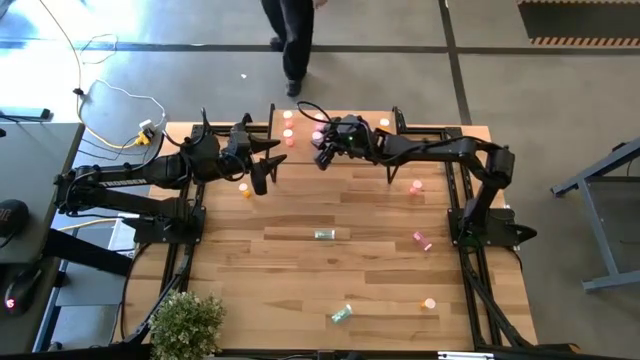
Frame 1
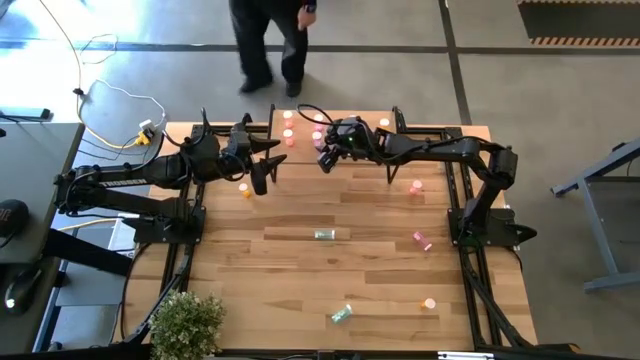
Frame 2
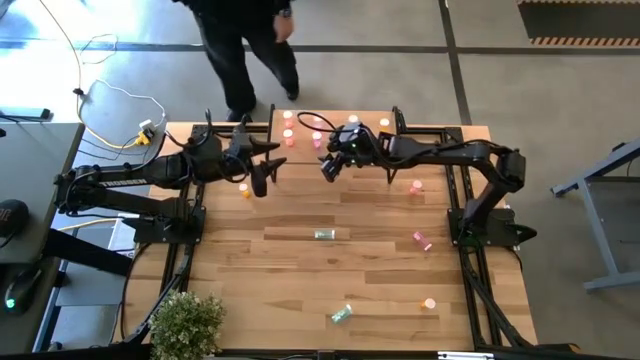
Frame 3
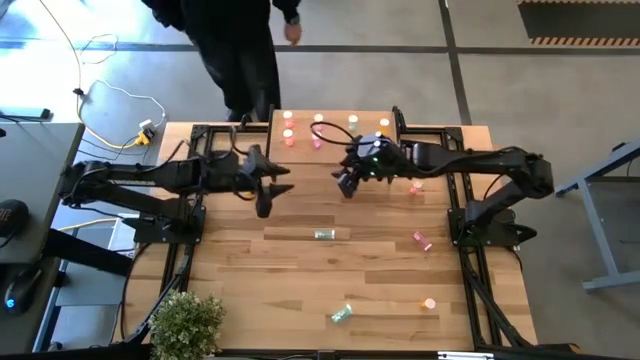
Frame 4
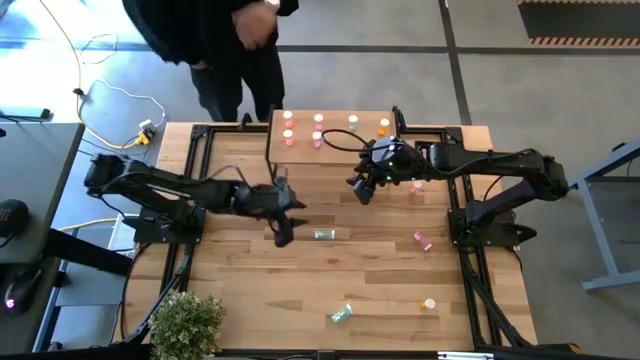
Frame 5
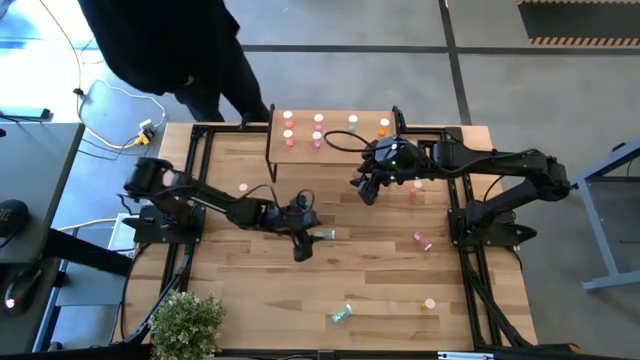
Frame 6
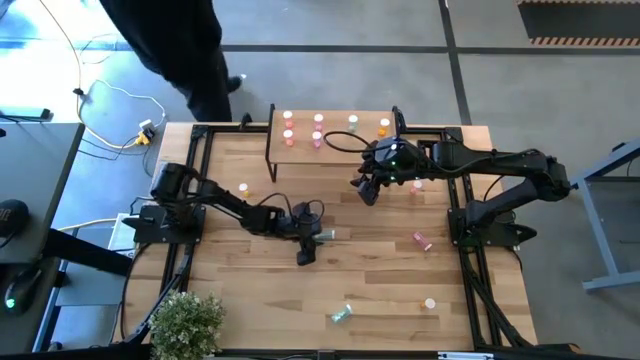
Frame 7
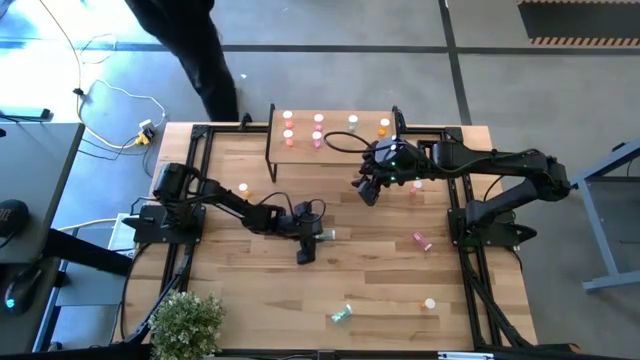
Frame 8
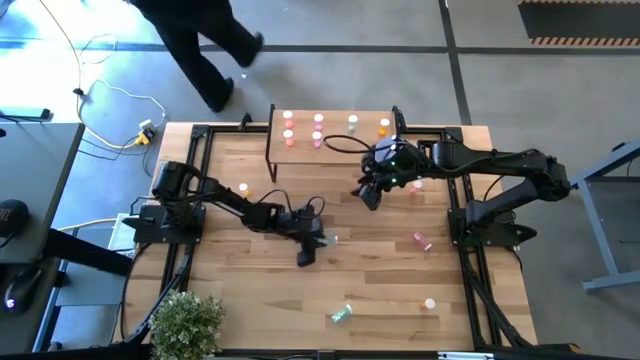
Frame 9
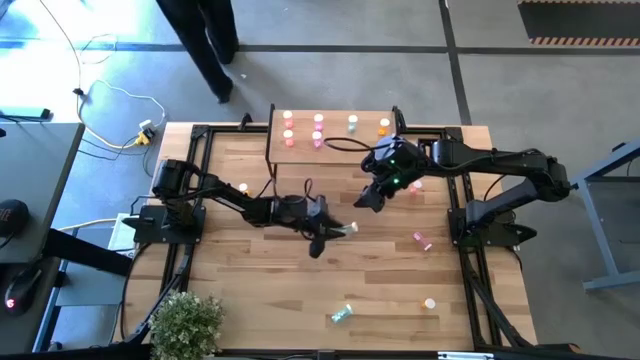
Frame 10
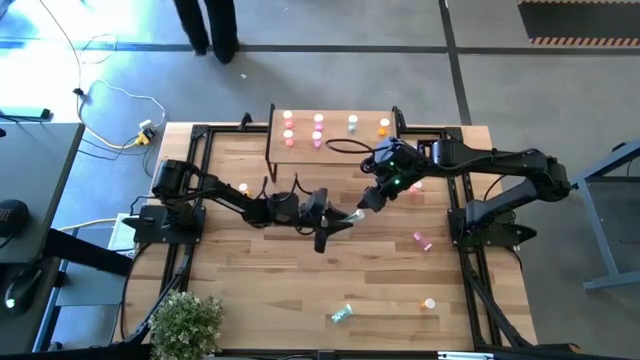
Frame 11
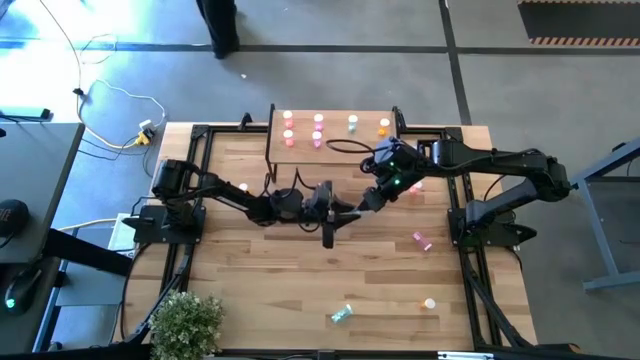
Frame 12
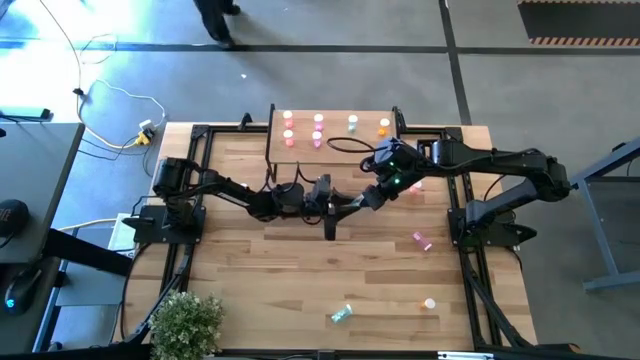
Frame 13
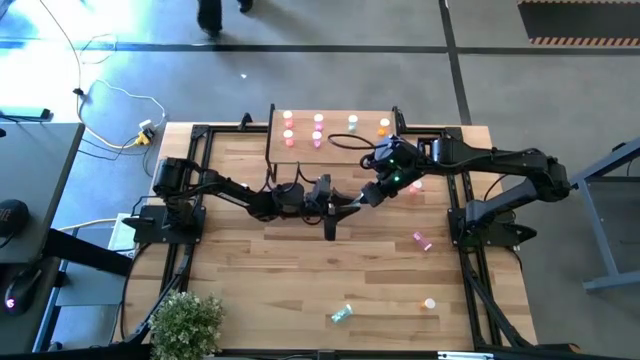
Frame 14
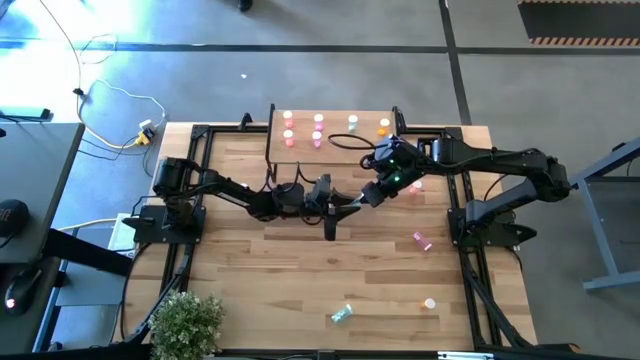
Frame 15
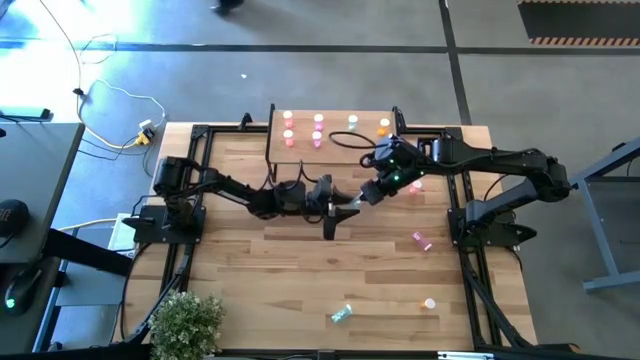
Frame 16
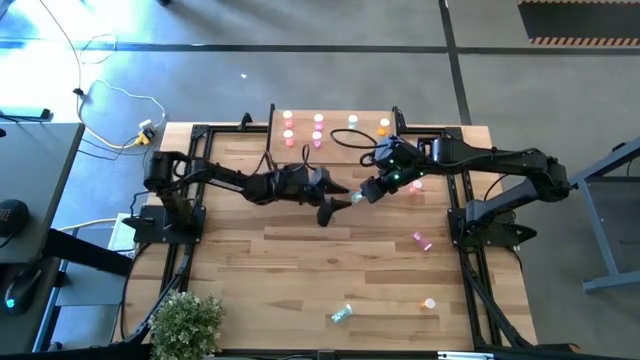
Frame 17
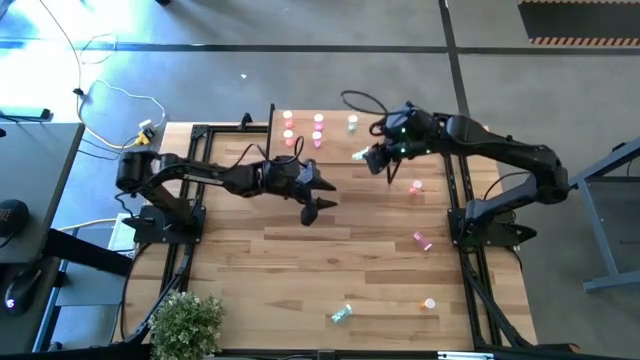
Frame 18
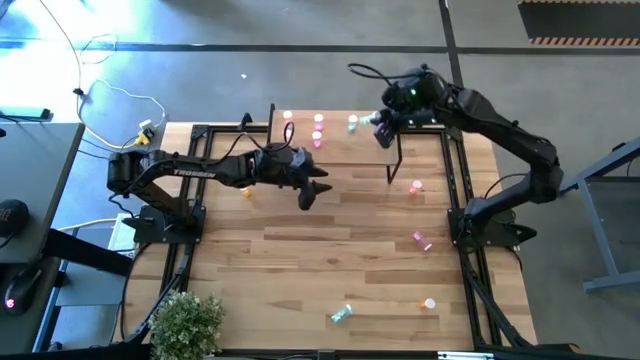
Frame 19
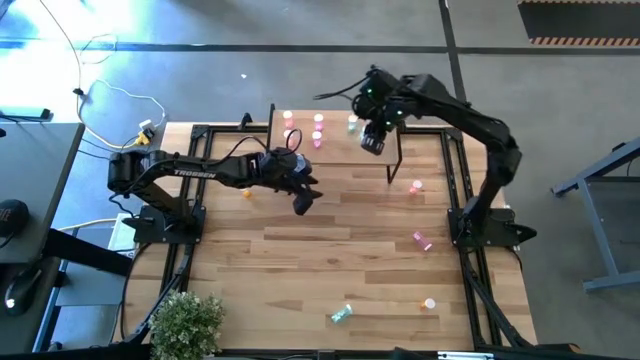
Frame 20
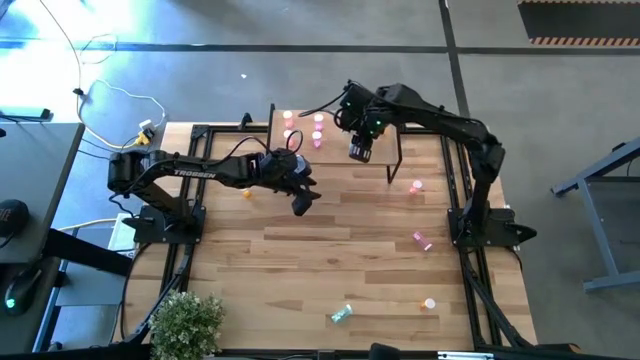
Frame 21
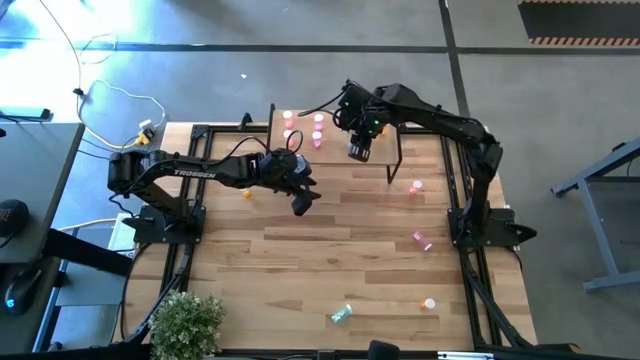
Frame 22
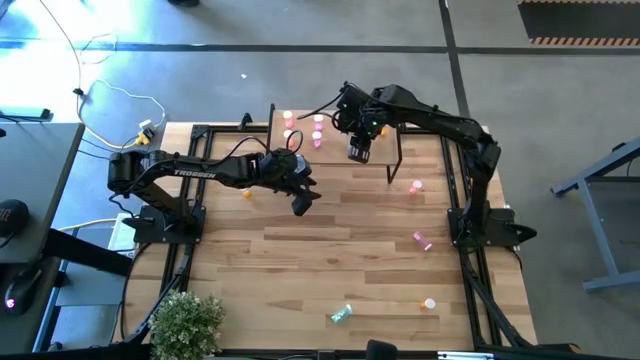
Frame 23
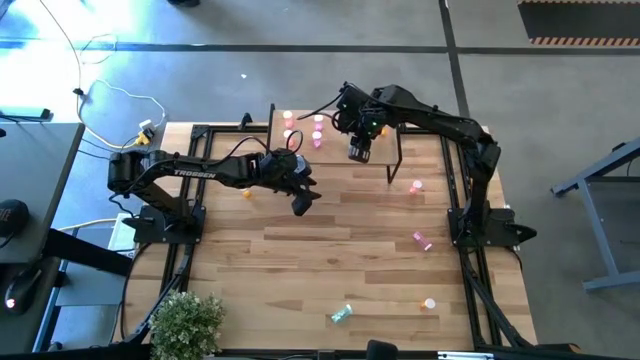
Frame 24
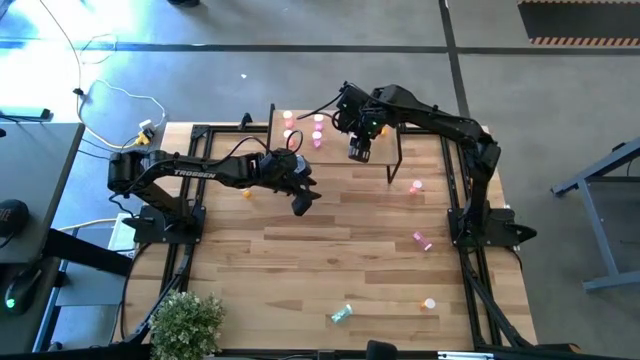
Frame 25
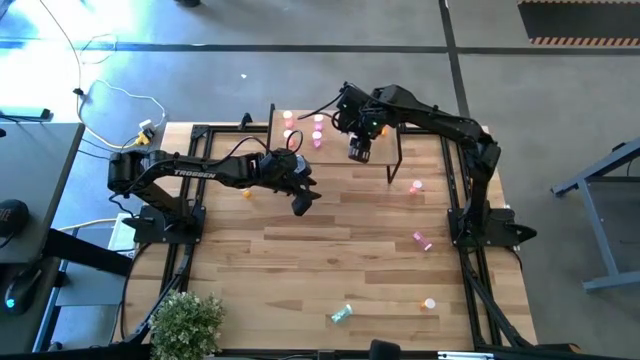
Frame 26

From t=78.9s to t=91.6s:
Task: Pick and place medicine bottles onto shelf by color
Put the top blue pill bottle on the shelf aligned with the blue pill bottle on the shelf

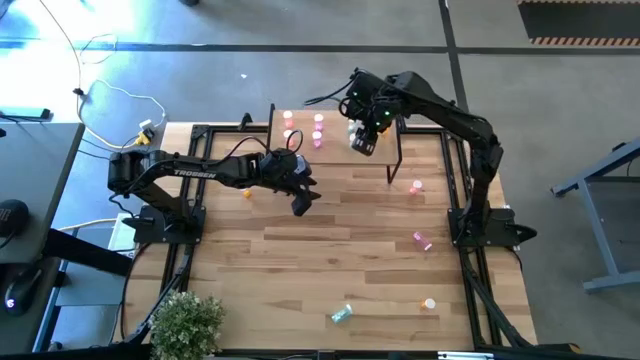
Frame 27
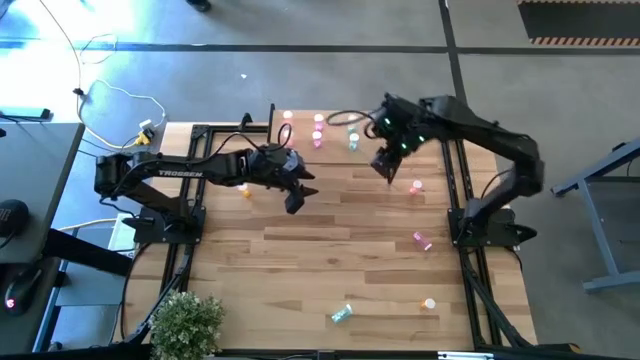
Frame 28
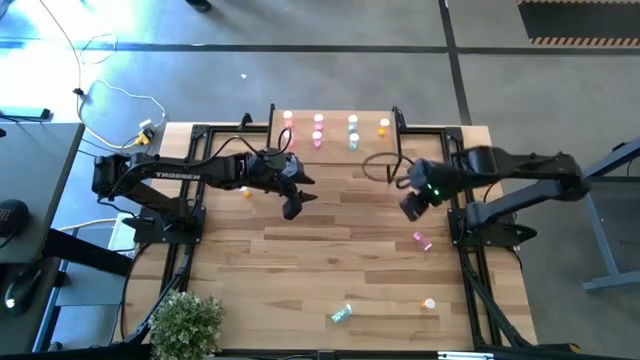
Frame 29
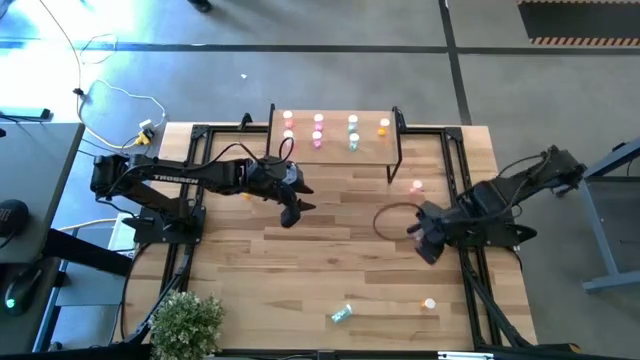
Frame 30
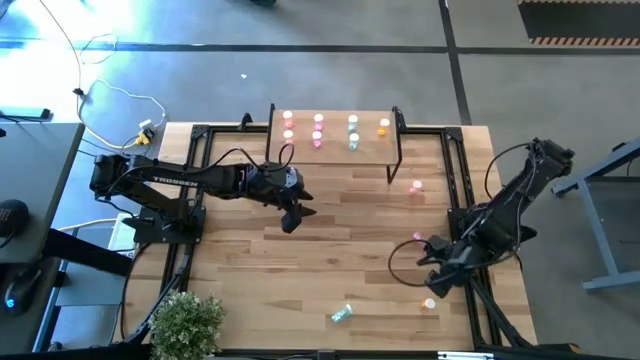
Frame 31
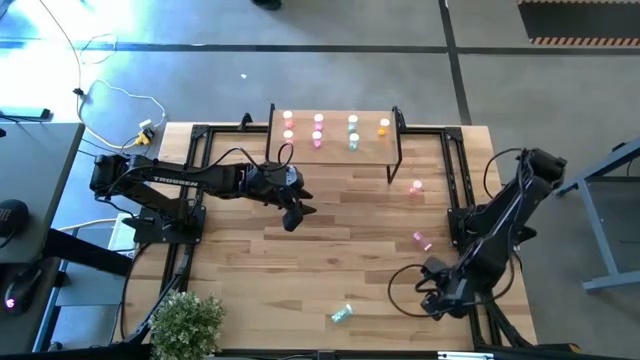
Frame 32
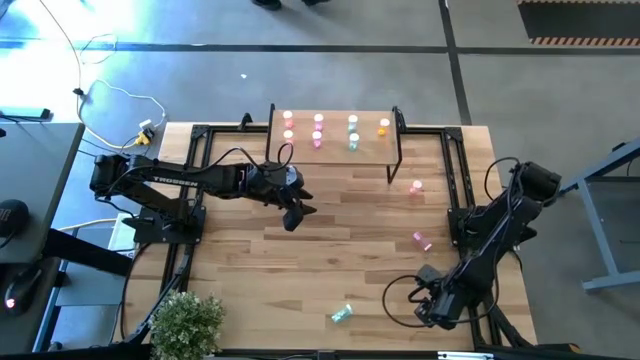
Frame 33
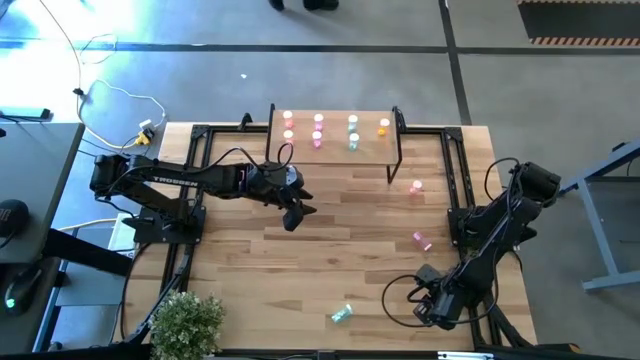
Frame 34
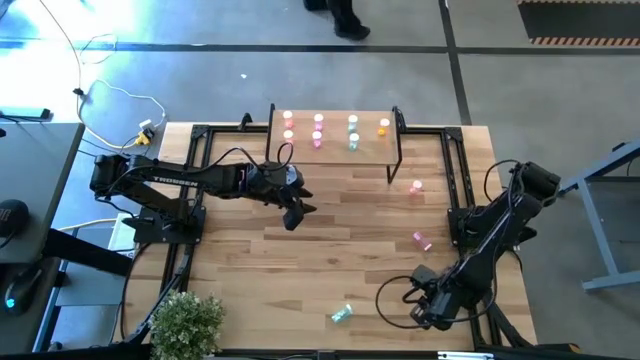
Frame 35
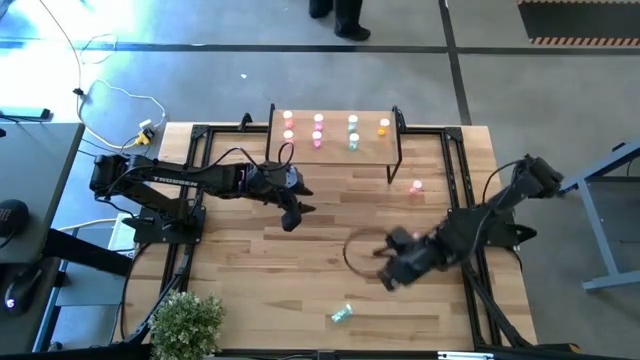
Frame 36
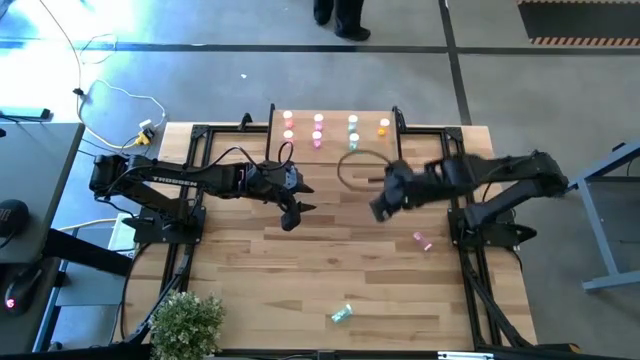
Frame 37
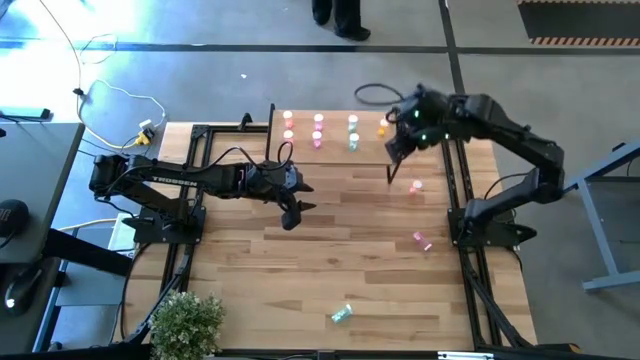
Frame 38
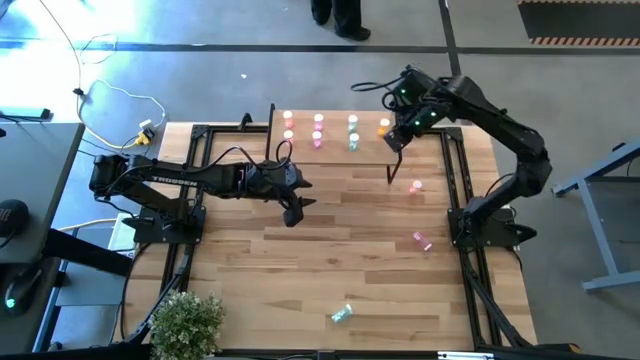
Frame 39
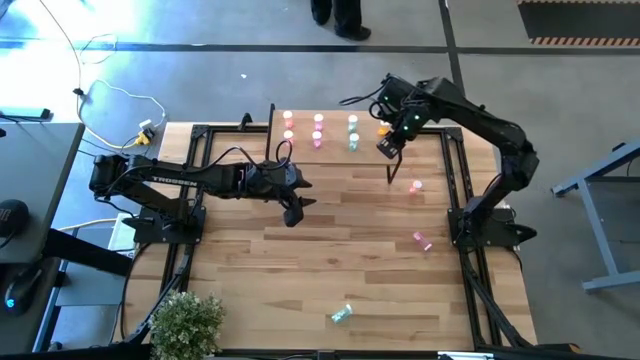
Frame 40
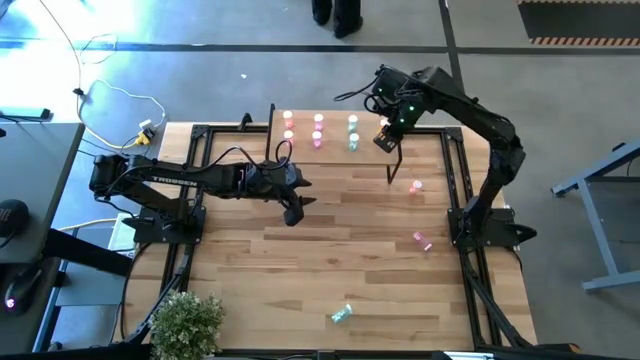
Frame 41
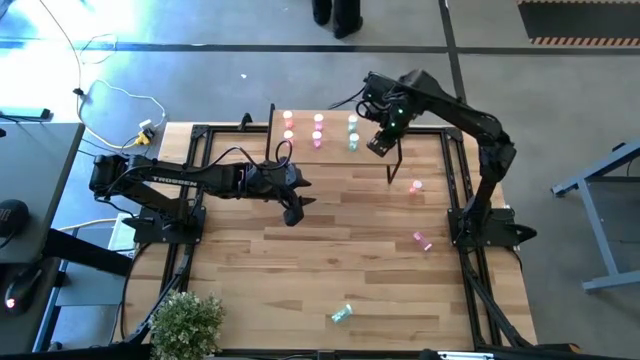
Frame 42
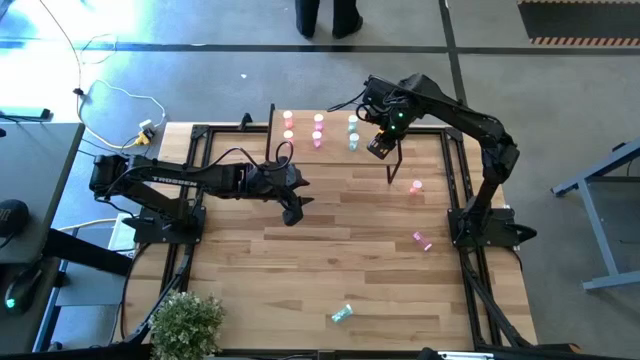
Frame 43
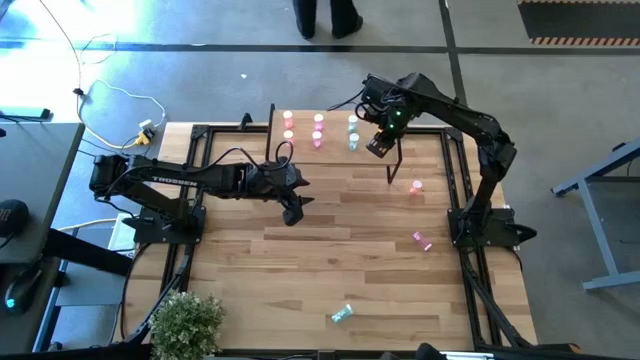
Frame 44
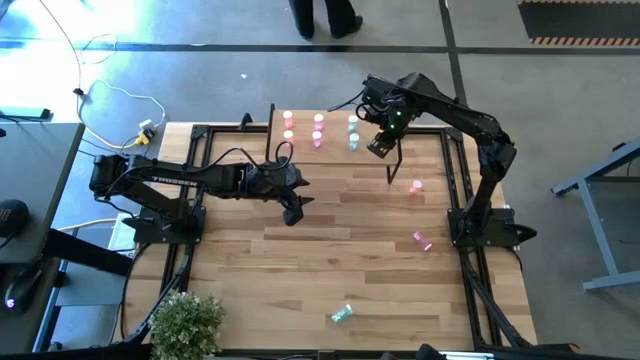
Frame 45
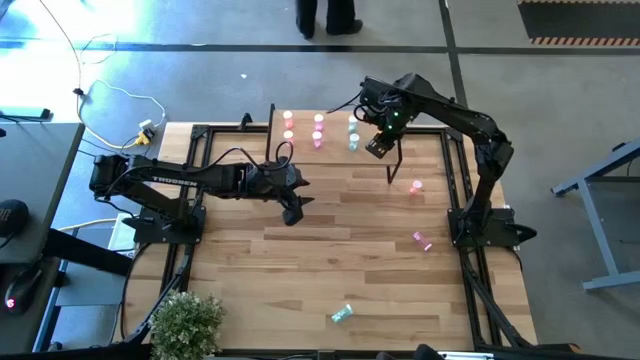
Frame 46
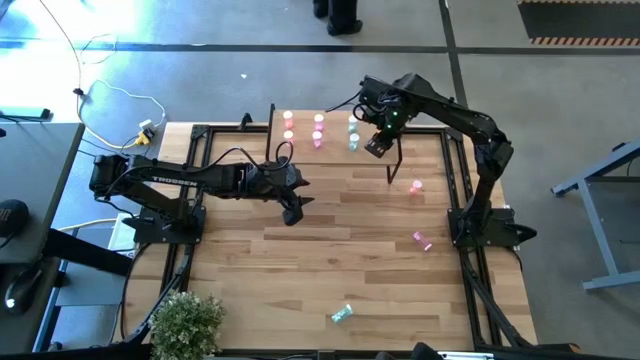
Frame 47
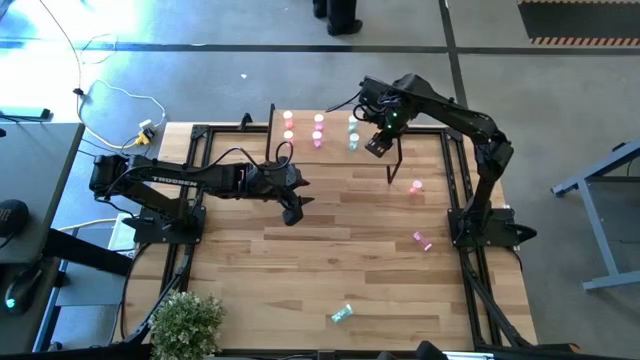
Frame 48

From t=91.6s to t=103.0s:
Put the bottom orange pill bottle aligned with the orange pill bottle on the shelf
